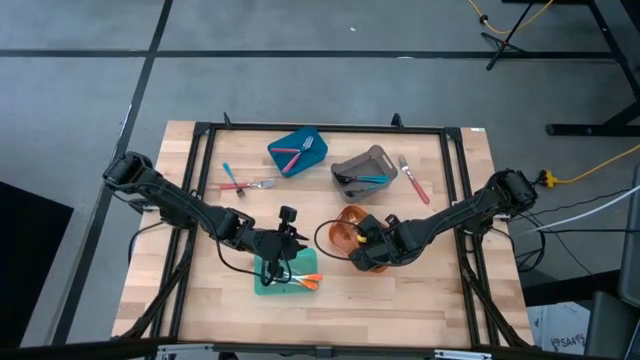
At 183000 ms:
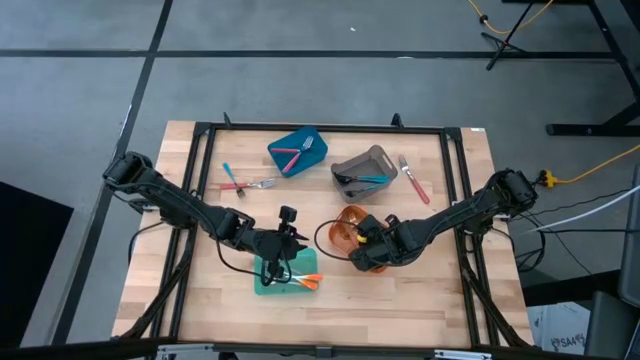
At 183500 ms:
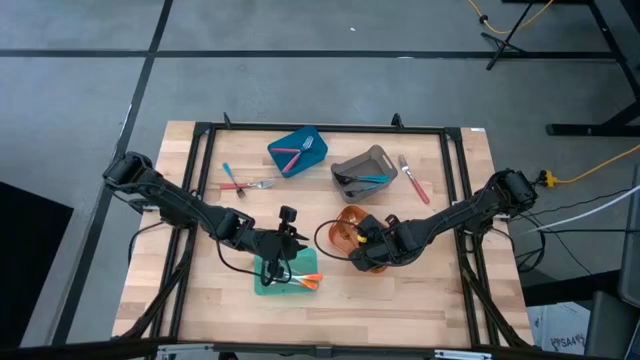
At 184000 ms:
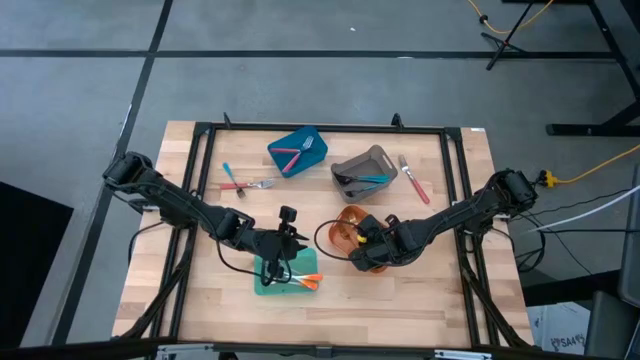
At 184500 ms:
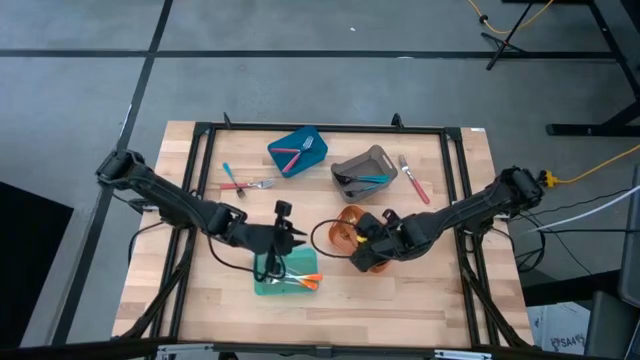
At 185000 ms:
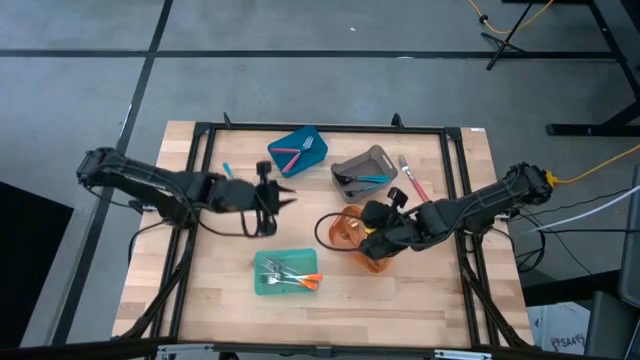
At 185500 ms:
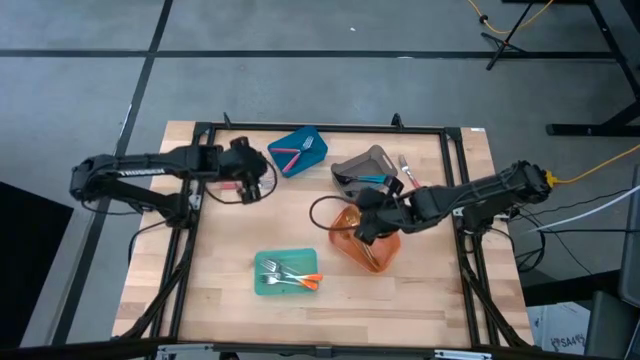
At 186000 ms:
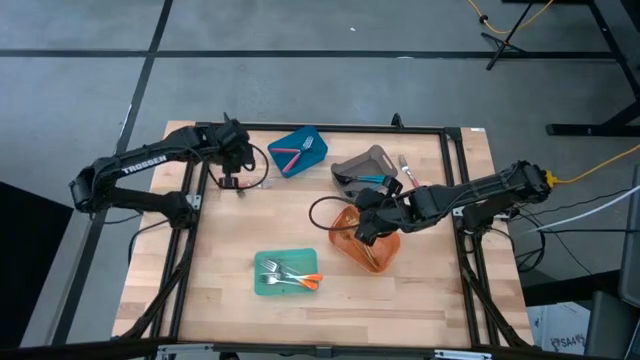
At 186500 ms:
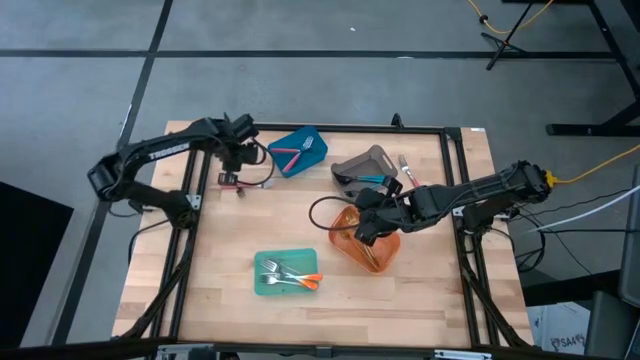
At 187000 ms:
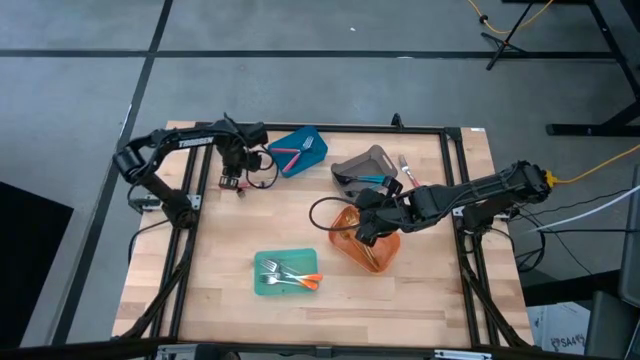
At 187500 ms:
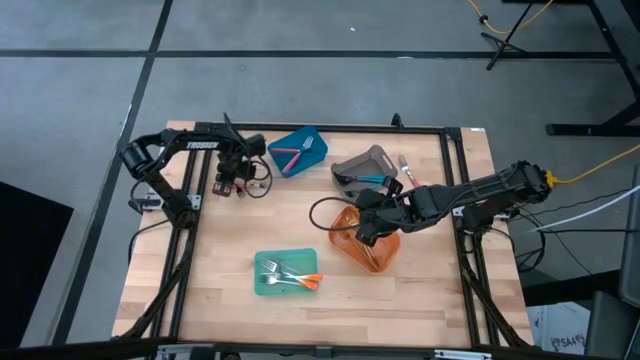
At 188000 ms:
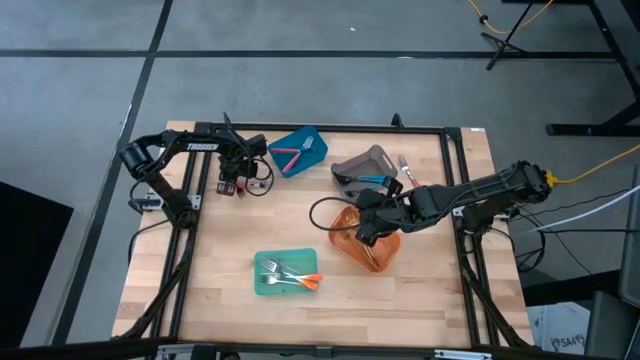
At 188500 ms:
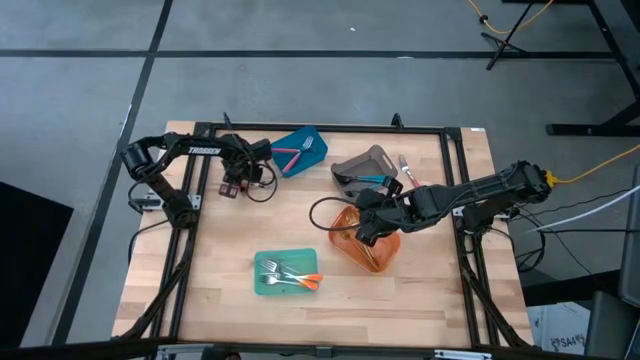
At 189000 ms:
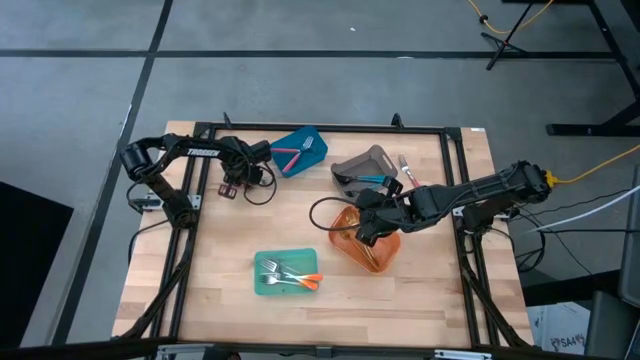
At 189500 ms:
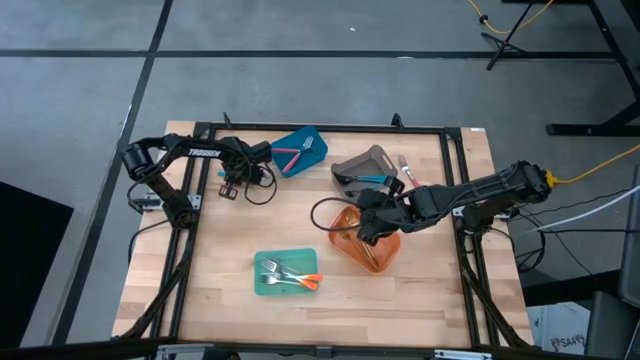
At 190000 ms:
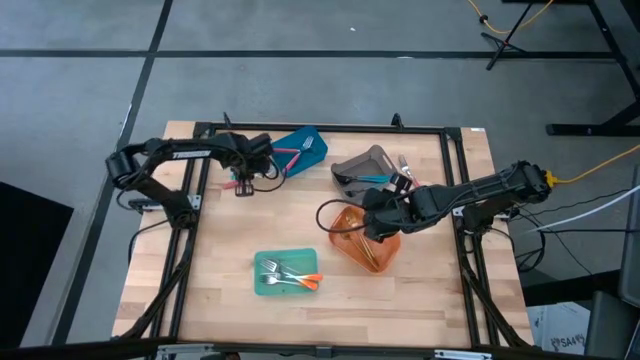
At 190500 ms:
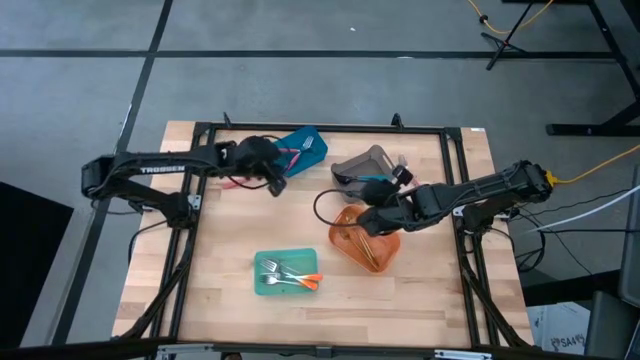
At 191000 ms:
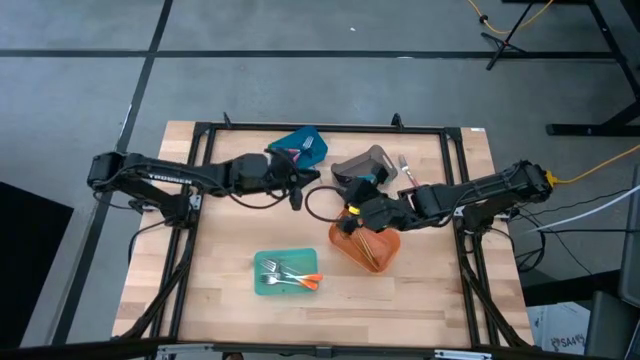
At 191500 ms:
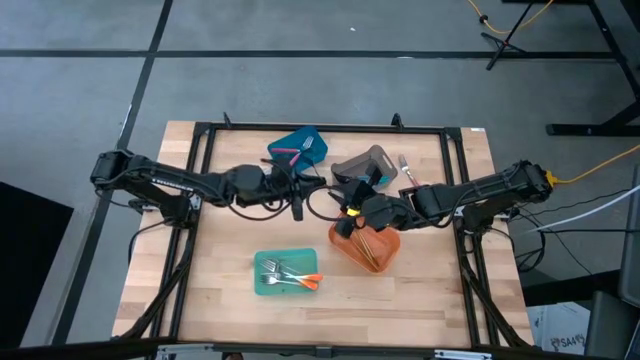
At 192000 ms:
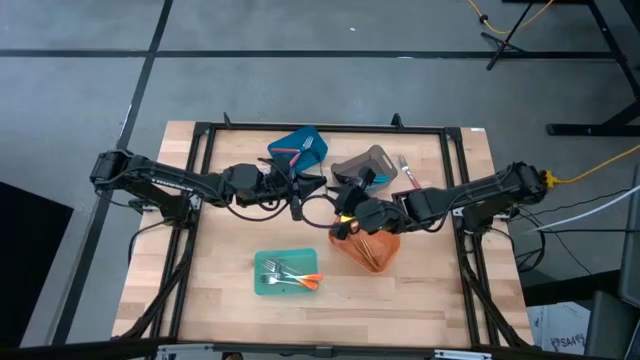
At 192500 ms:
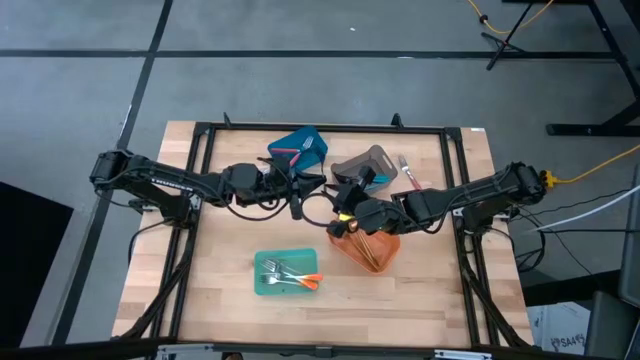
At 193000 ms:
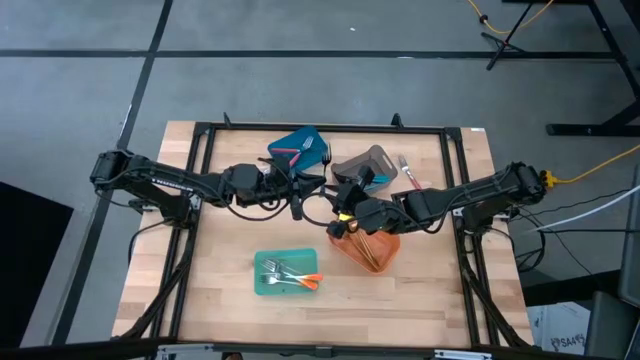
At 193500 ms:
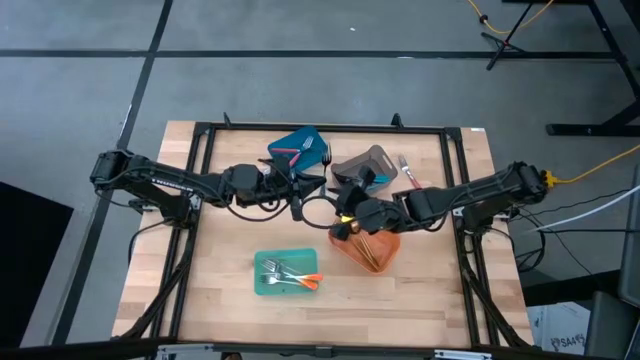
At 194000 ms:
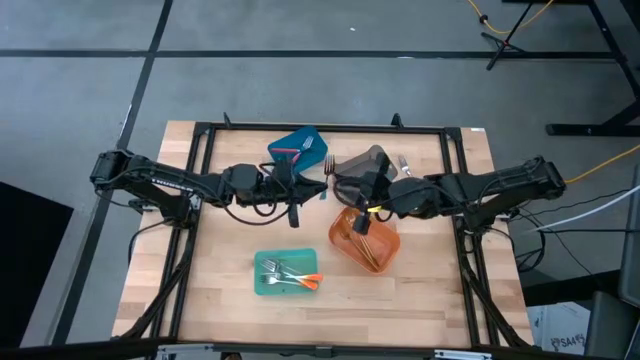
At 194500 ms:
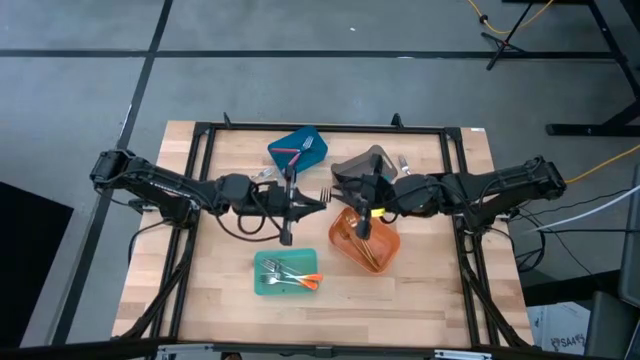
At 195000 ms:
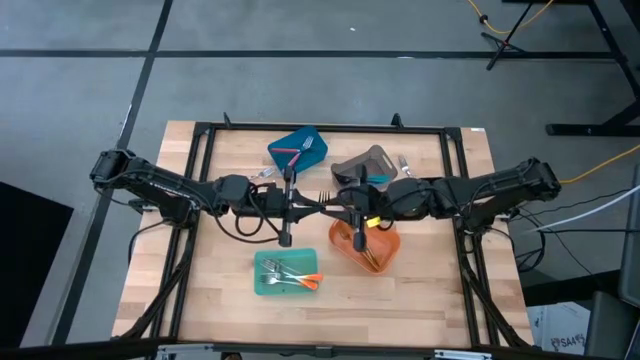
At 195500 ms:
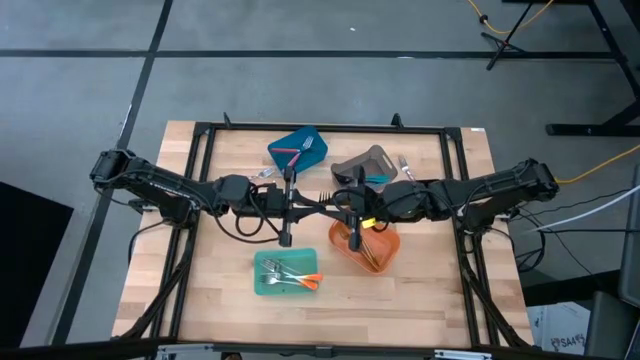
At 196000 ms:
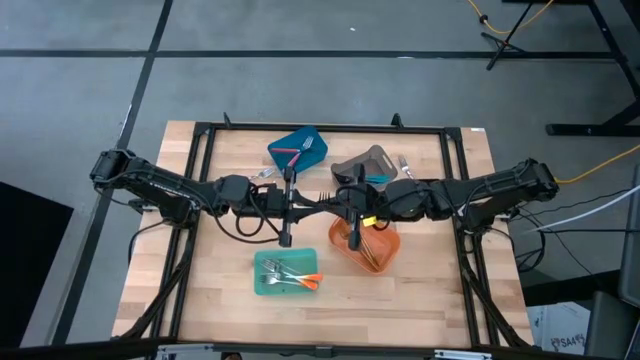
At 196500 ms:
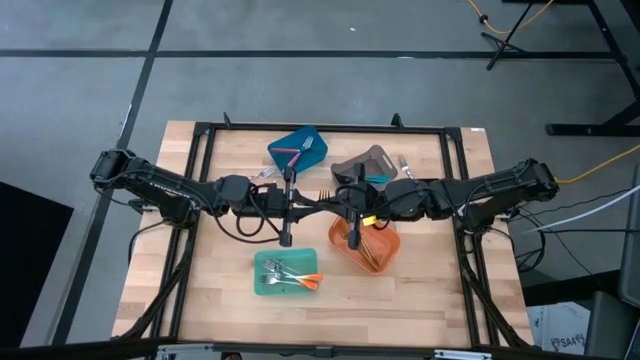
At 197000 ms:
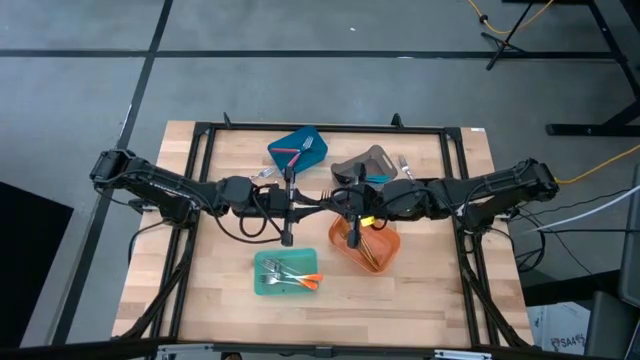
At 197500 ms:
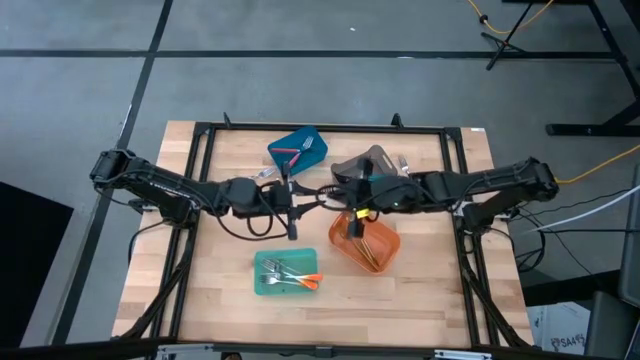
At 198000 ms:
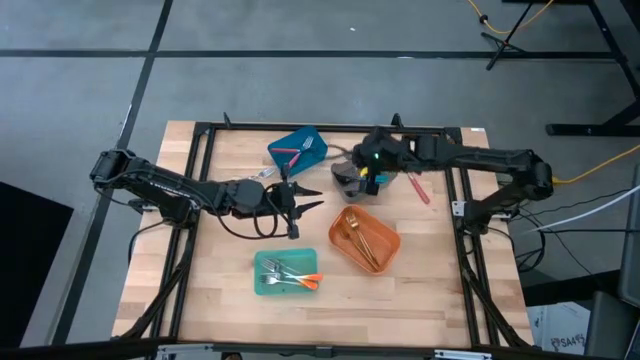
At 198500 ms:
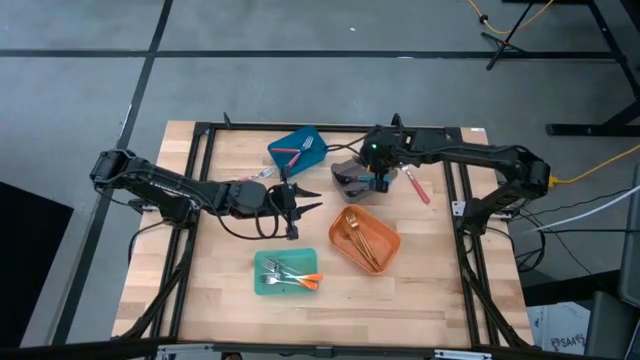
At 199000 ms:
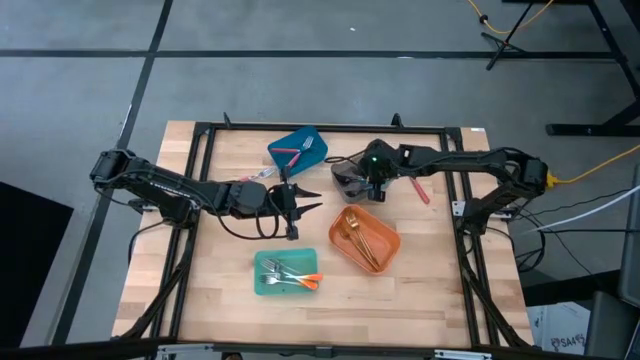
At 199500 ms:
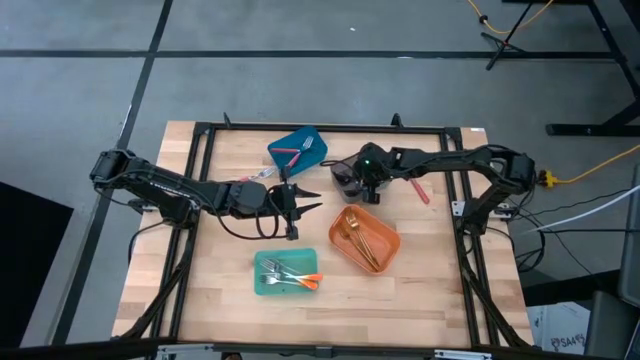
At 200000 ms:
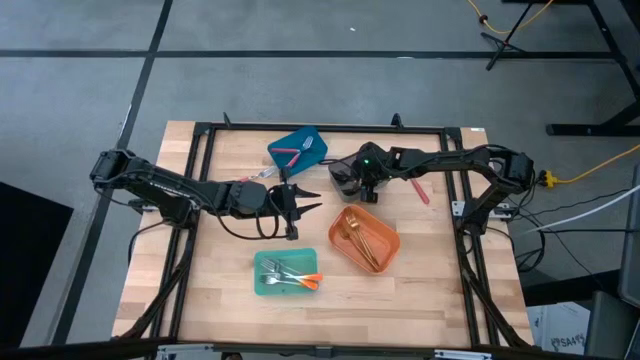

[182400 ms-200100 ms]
Task: Sort silverware by color (type)
Put the blue fork into the black bin

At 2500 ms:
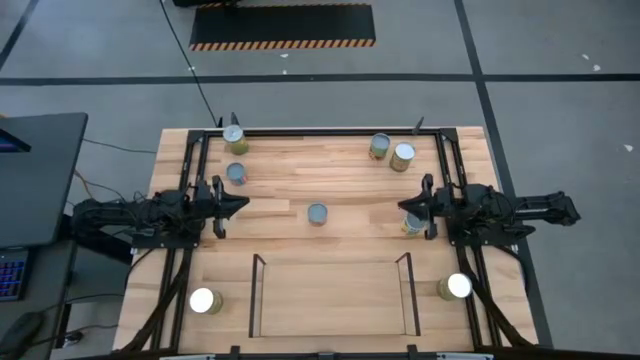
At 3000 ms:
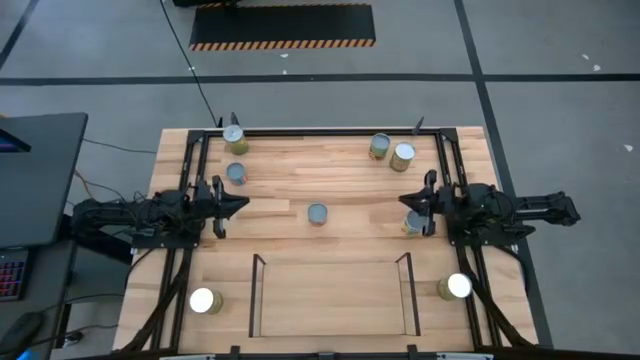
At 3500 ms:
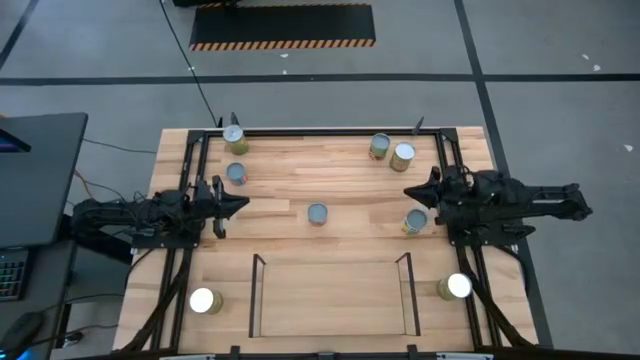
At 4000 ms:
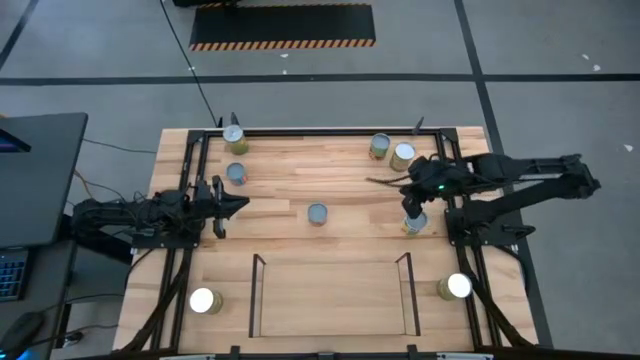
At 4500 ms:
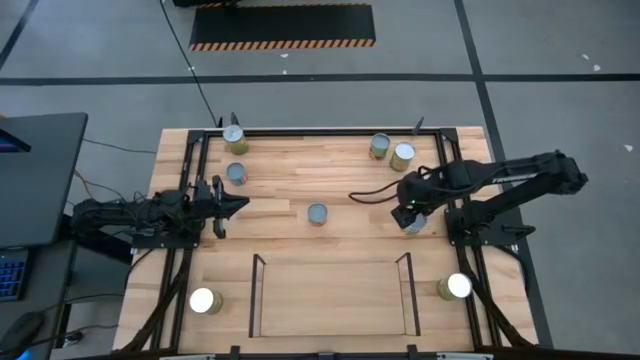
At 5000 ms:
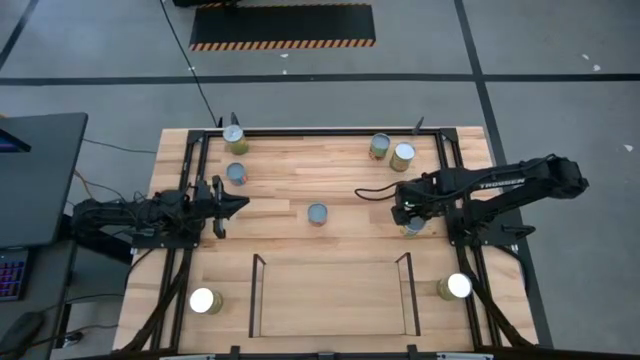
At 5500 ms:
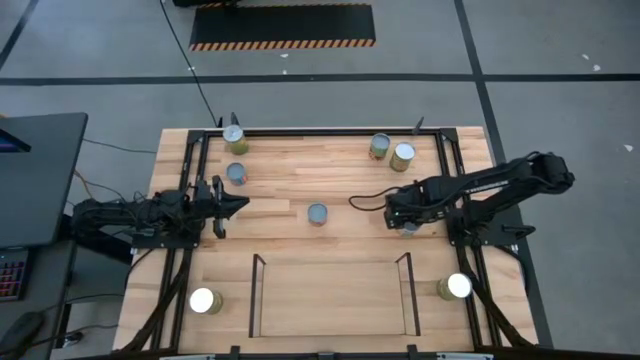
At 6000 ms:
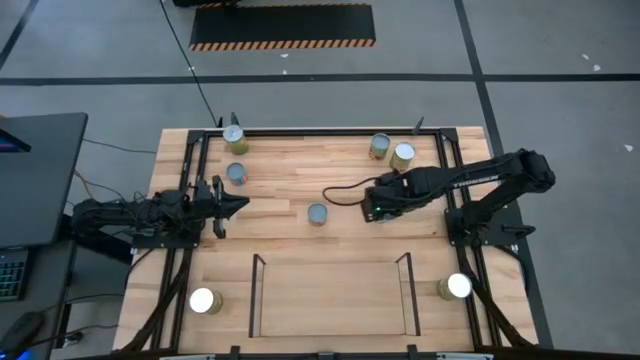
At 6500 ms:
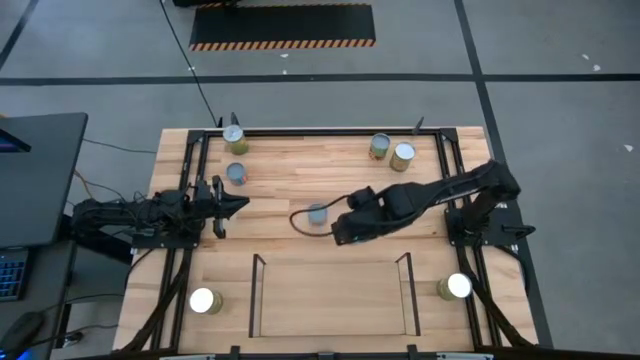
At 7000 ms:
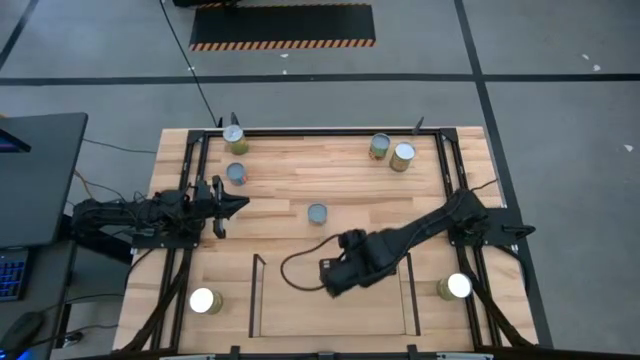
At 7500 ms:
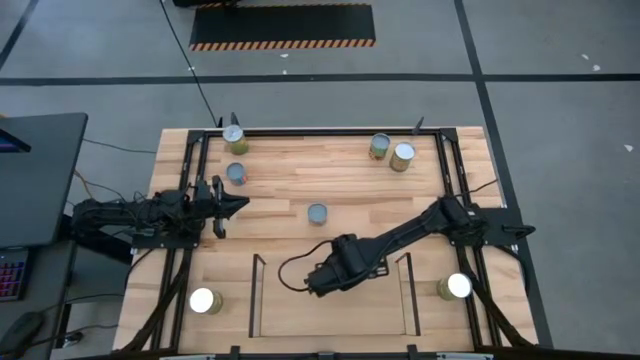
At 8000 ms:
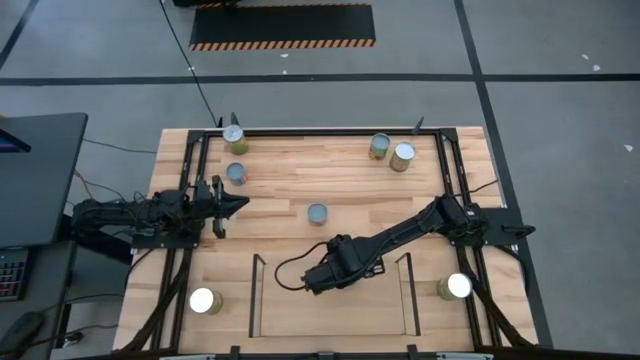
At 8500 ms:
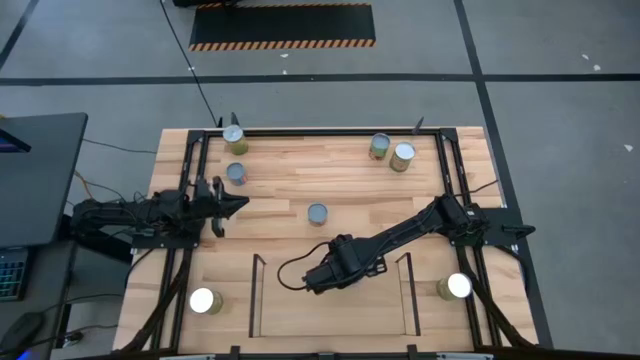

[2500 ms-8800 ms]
Task: Pick and place cans onto a shelf
Put the canned mixed fruit on the shelf
